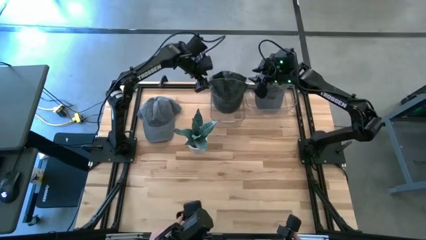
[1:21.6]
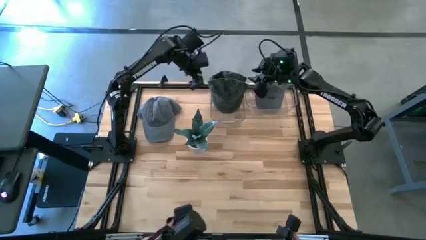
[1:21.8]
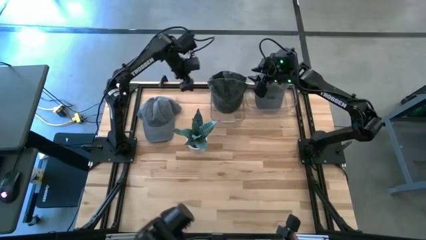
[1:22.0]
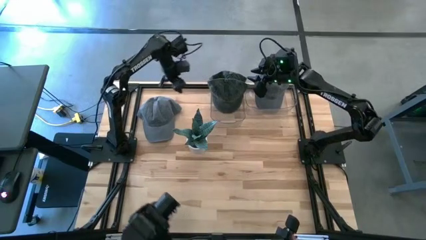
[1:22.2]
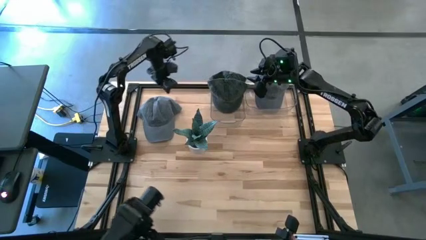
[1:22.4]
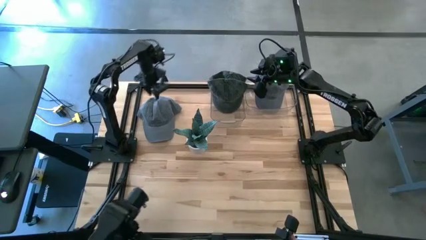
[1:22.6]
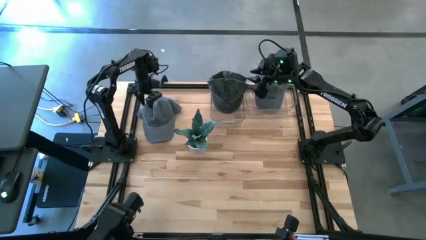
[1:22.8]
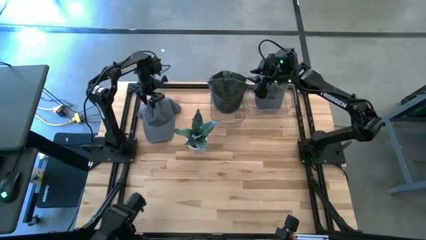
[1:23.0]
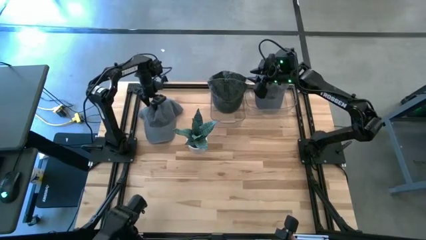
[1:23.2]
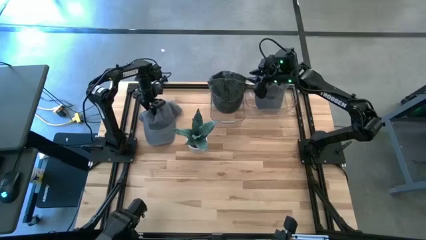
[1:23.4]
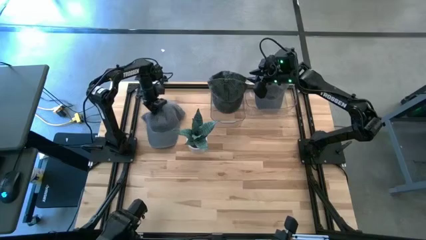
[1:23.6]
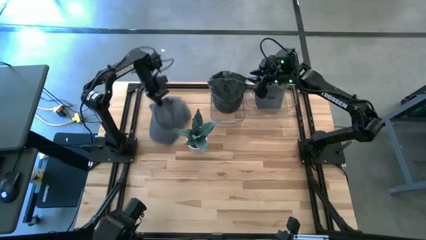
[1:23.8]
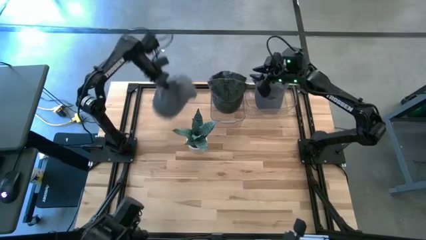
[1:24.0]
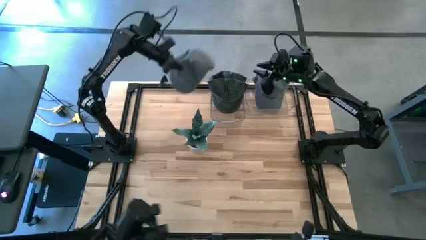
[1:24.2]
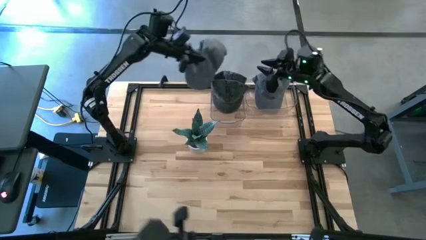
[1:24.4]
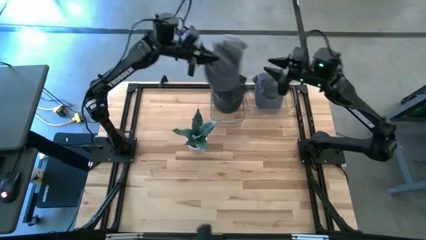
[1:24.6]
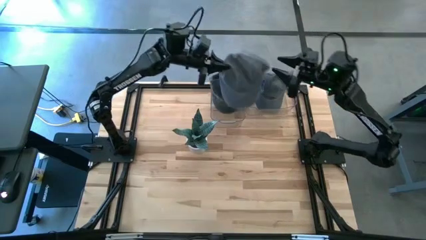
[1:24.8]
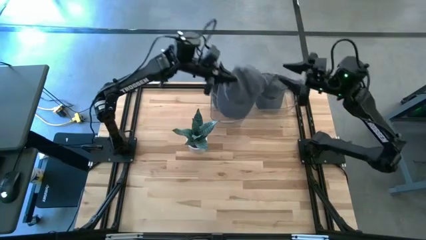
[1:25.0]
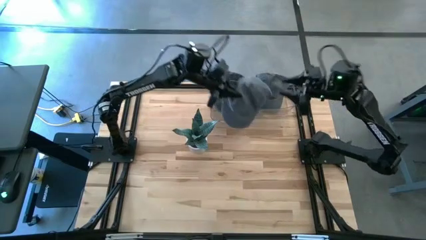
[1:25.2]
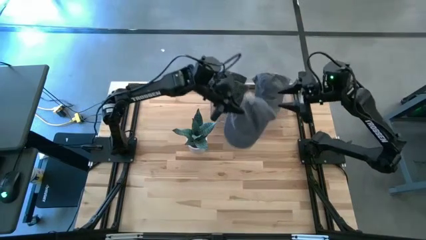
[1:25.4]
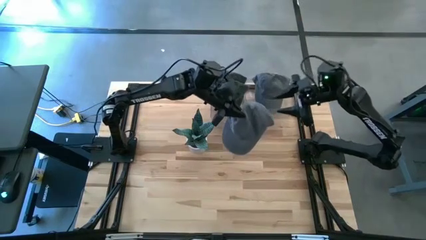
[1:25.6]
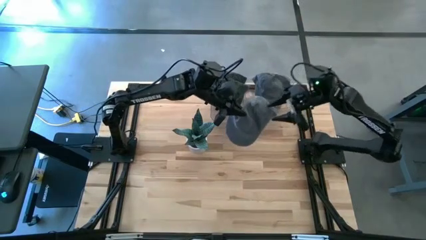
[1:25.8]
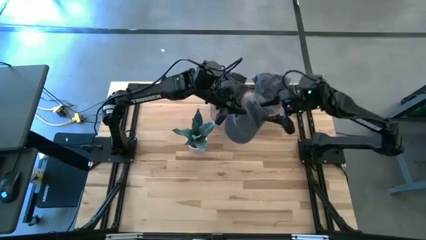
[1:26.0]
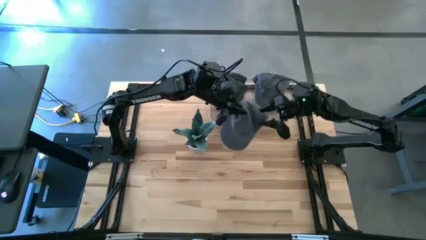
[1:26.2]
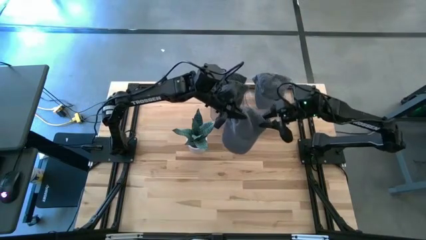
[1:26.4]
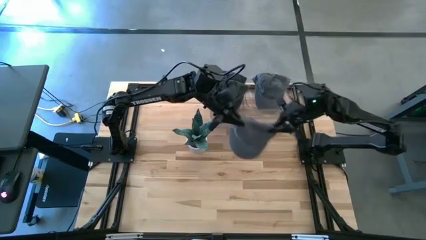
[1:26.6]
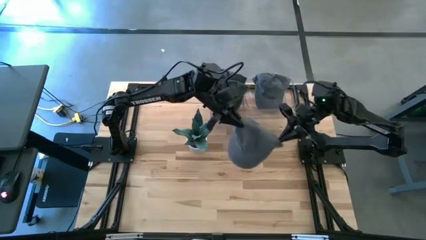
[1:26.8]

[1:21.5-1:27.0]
Task: Pick & Place hat
Put the gray cap into the right transparent bin

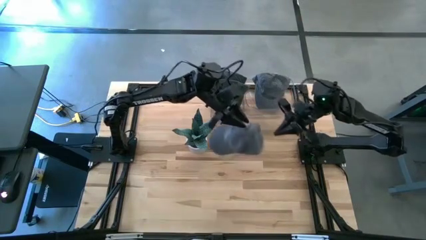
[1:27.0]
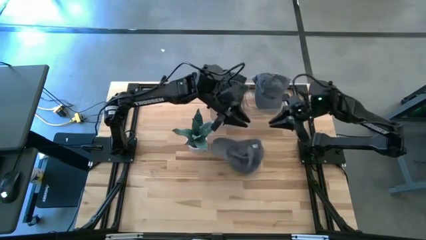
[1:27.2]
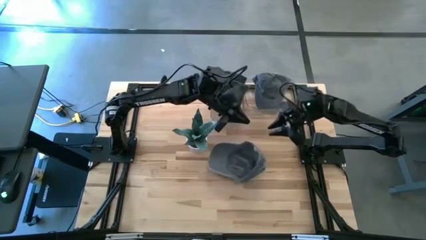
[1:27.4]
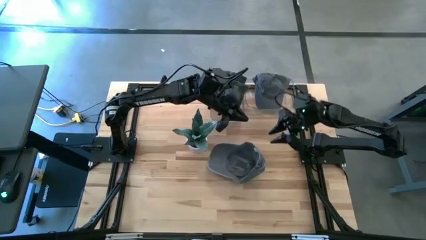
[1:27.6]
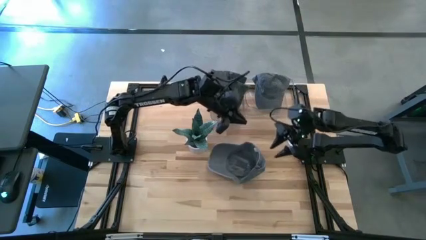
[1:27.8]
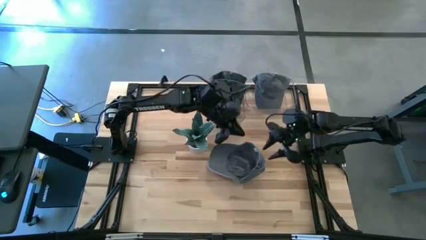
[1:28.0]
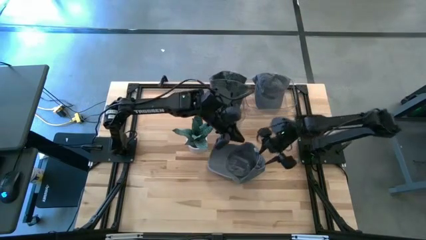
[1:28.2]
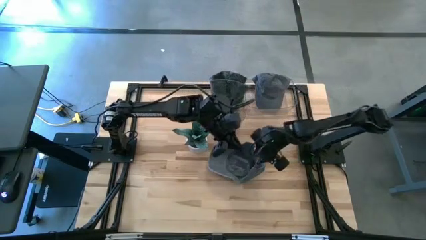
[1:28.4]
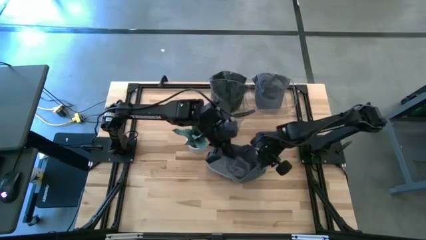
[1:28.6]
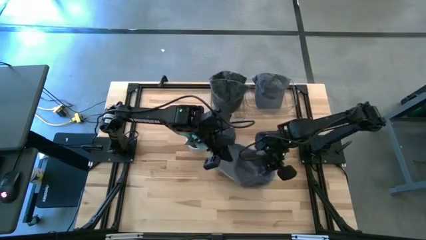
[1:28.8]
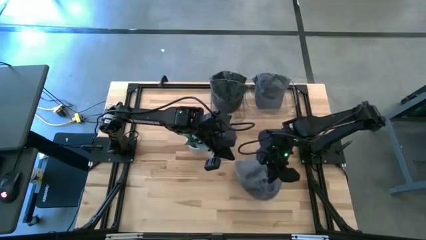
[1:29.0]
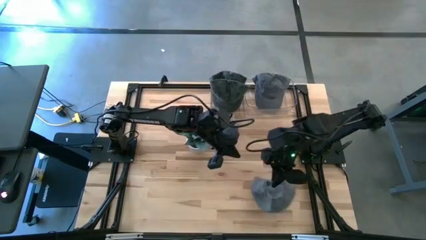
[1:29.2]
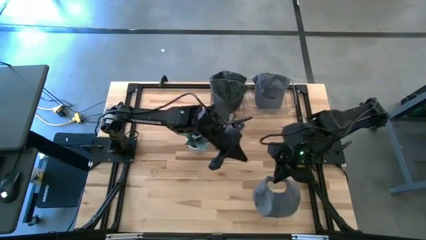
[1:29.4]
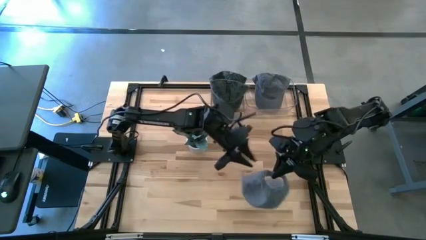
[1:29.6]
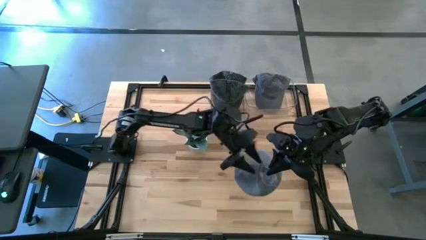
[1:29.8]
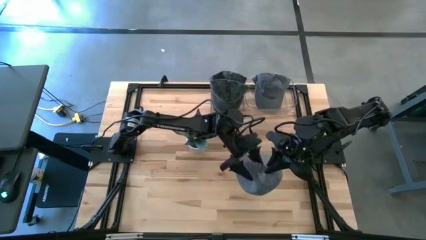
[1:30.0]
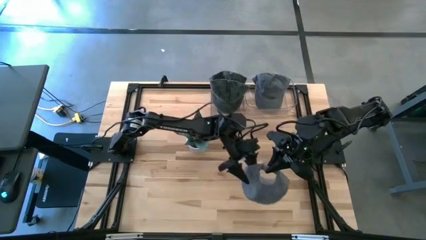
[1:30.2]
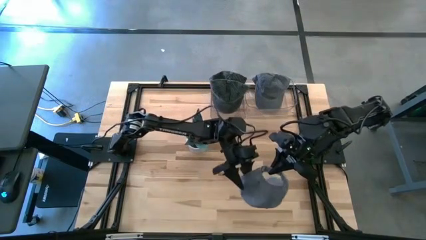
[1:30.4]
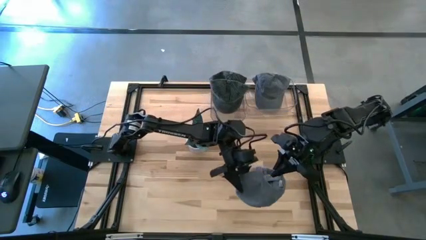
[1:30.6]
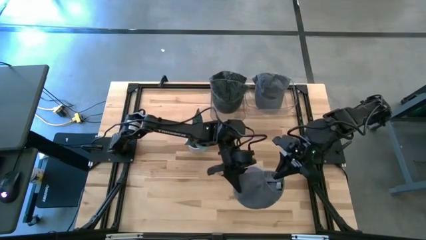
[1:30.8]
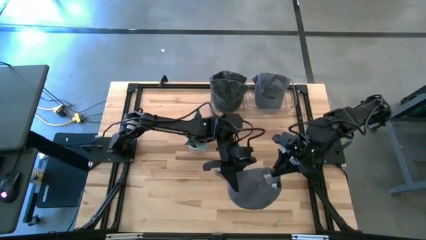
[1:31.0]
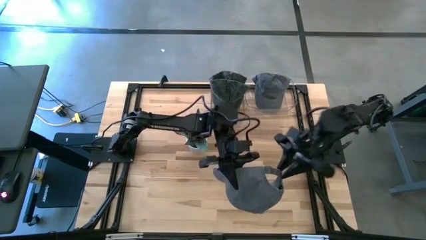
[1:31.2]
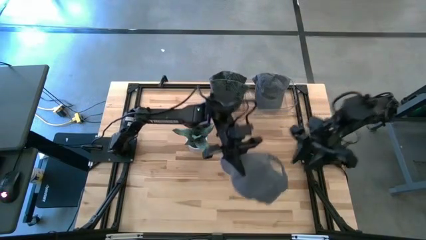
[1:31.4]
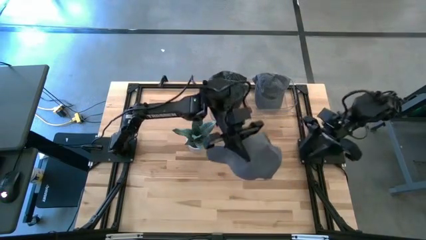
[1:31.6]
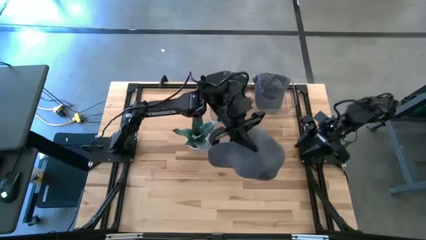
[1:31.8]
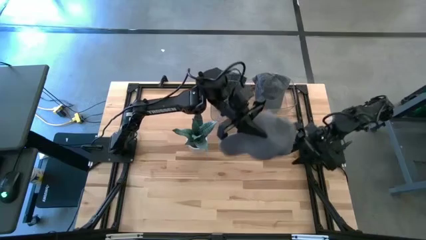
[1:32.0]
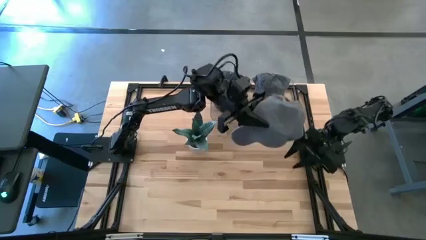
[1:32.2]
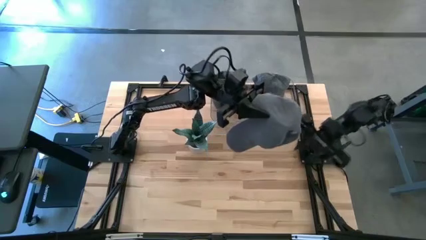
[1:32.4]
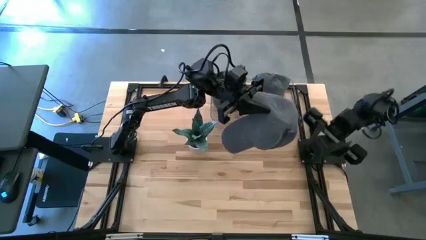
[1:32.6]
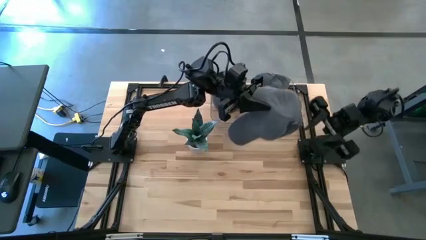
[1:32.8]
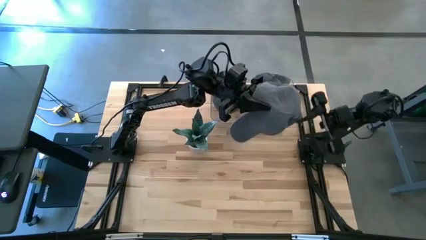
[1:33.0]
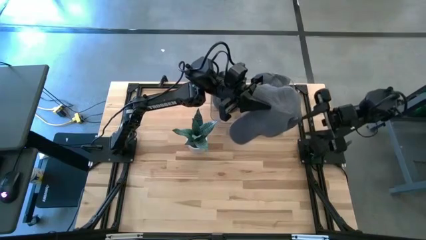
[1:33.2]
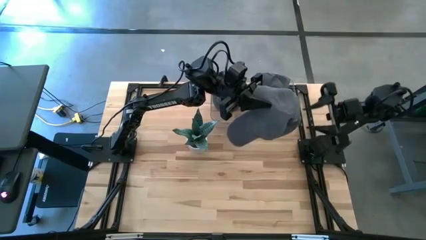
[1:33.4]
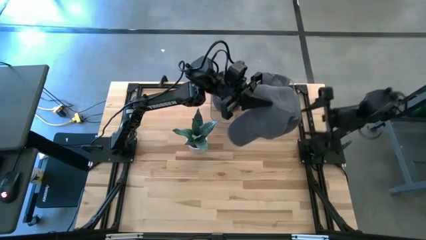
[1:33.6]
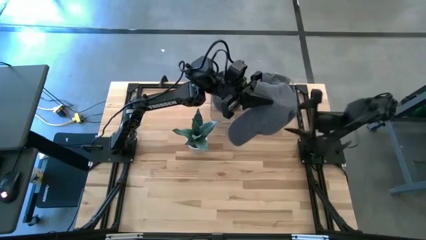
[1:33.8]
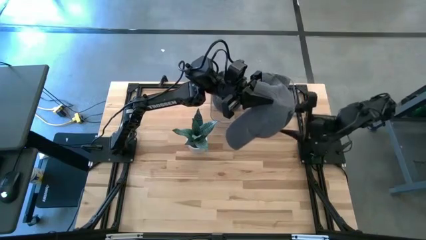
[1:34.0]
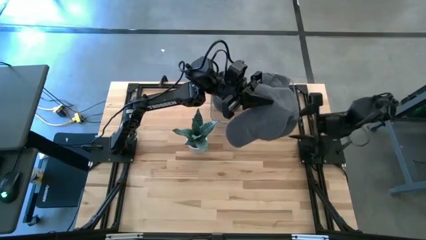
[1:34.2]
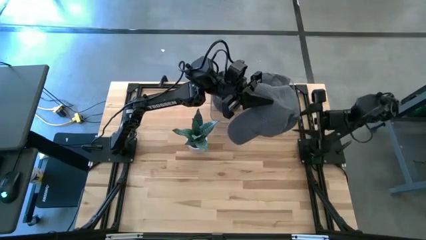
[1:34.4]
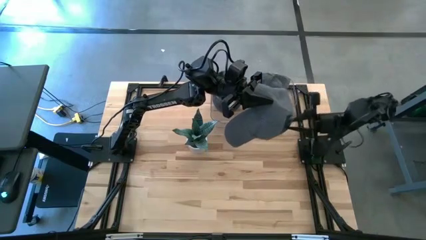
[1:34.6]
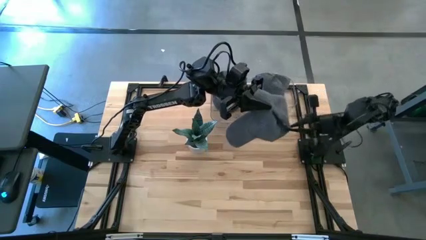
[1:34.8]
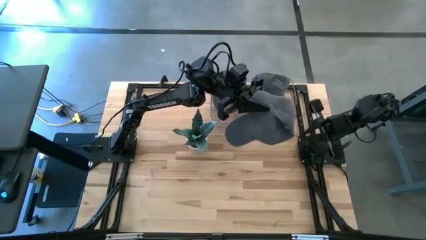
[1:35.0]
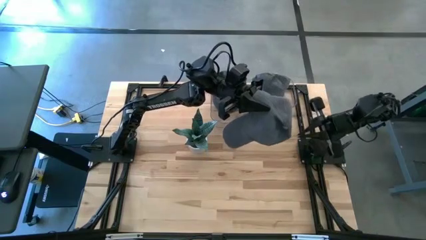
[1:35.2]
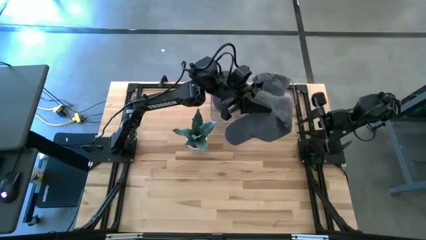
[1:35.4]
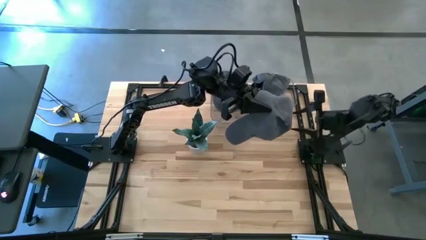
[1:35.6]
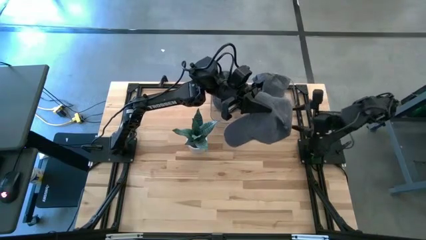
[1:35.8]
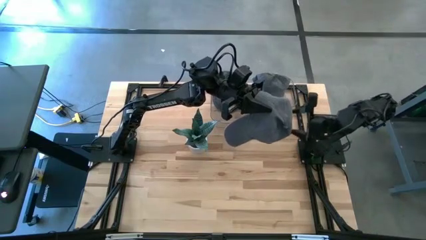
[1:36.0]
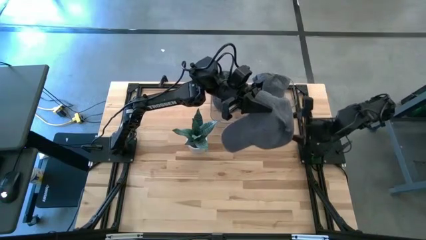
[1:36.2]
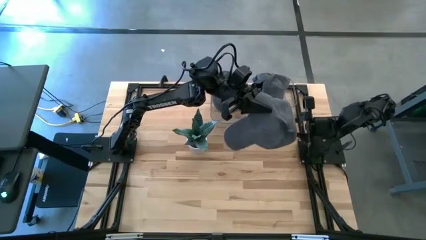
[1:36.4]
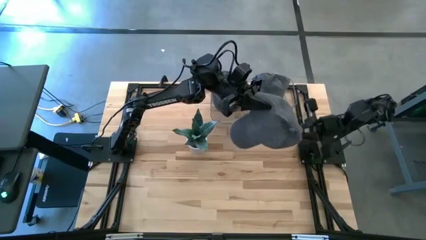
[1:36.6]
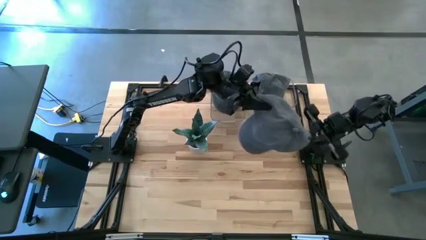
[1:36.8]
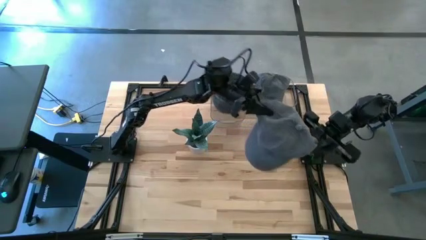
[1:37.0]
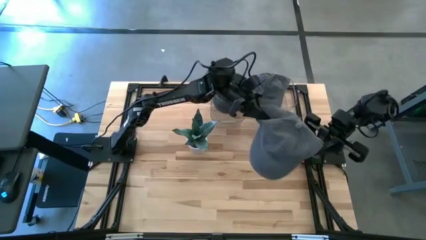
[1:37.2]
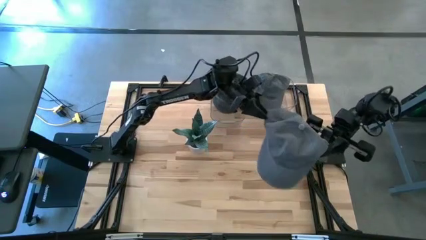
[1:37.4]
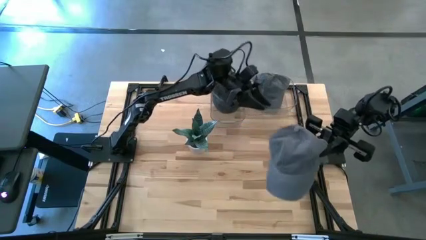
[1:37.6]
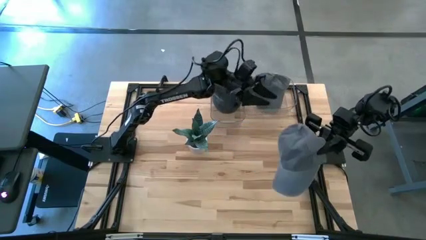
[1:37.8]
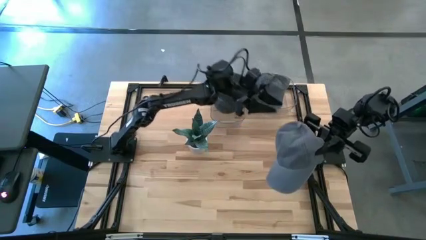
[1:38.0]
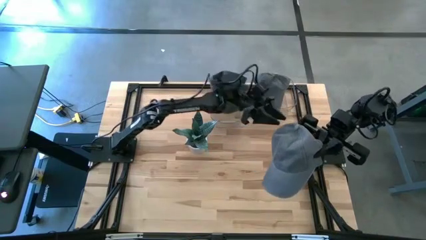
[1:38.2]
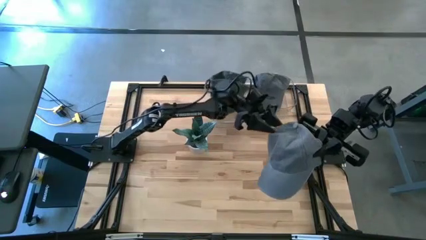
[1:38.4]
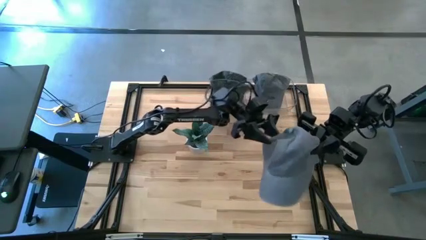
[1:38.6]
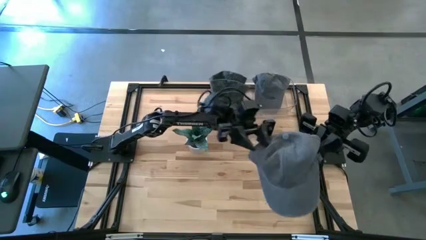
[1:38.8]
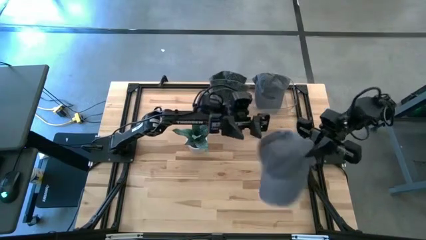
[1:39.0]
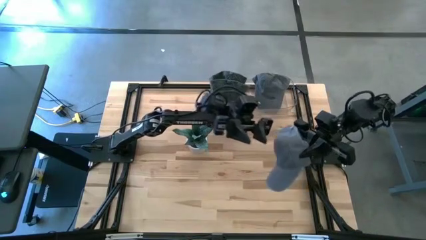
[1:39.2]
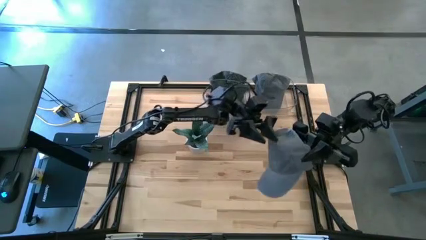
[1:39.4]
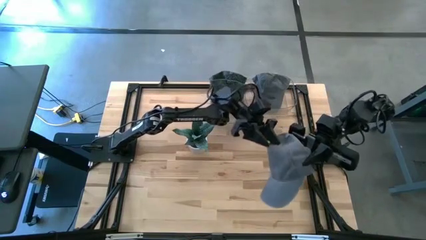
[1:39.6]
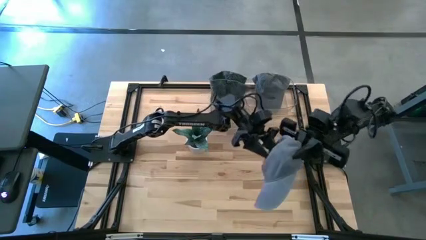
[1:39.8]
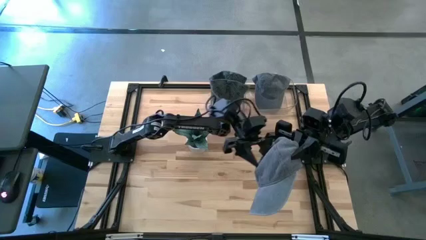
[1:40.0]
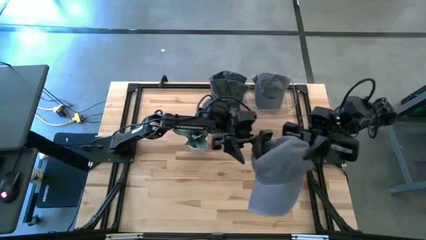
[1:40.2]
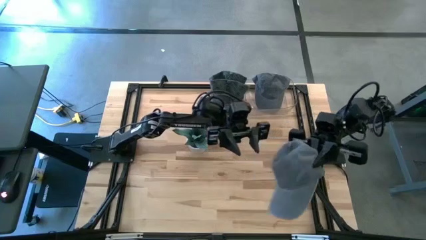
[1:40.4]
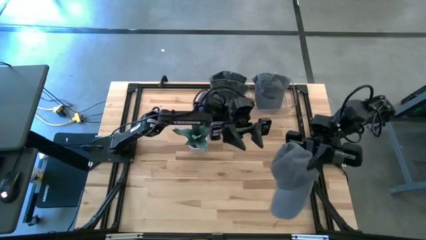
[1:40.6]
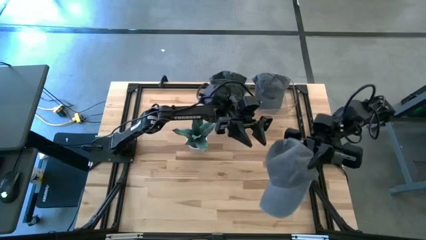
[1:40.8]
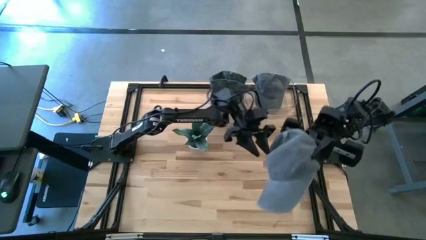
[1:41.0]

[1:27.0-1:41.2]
Put the gray cap into the right transparent bin
